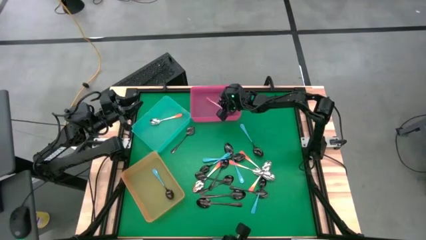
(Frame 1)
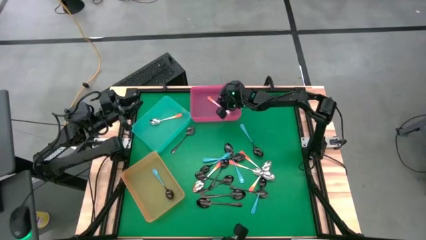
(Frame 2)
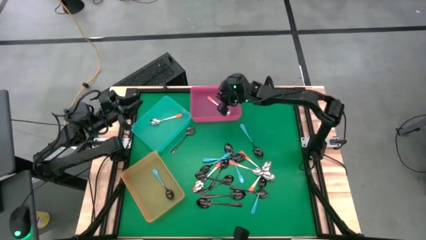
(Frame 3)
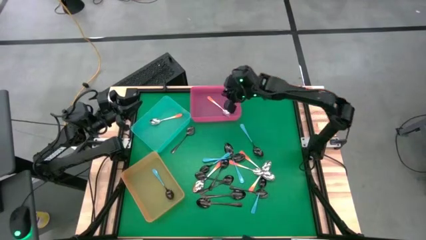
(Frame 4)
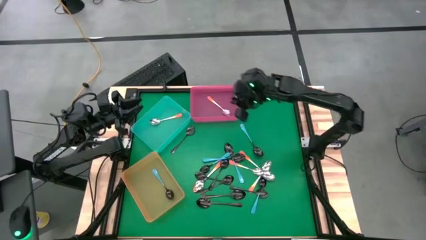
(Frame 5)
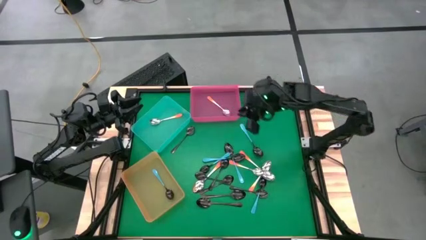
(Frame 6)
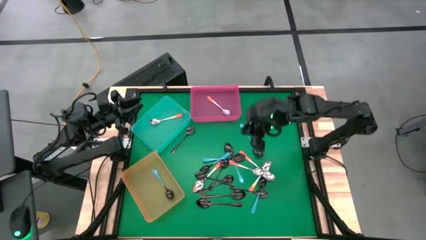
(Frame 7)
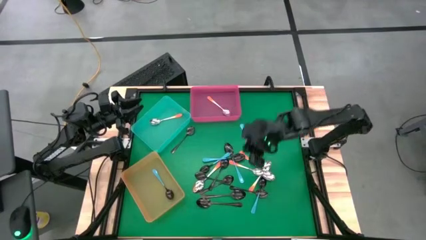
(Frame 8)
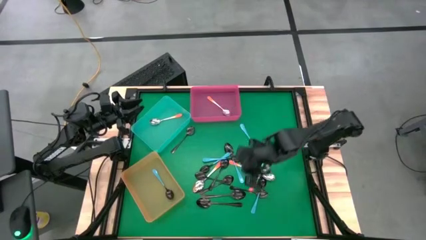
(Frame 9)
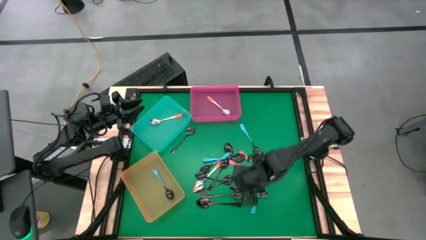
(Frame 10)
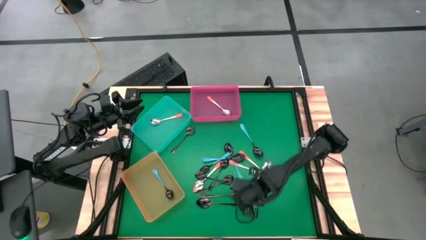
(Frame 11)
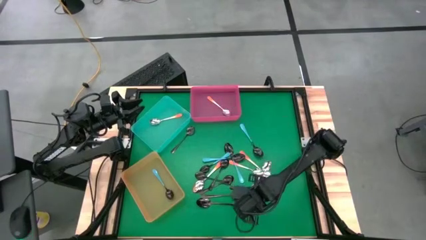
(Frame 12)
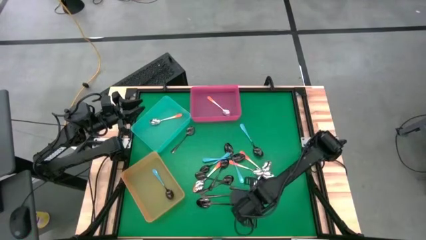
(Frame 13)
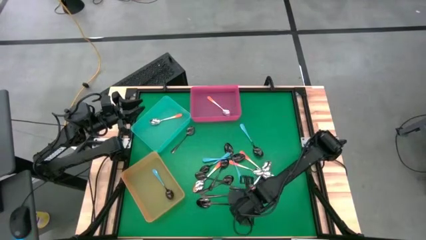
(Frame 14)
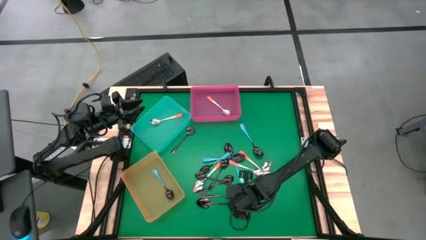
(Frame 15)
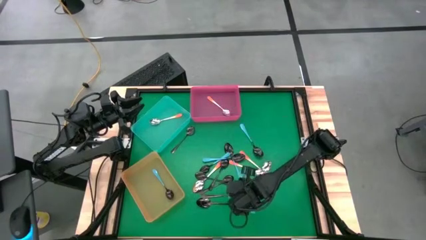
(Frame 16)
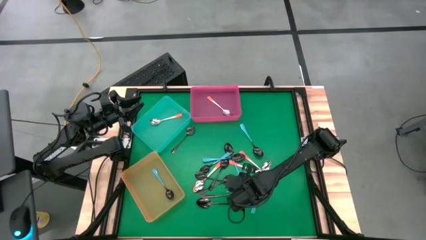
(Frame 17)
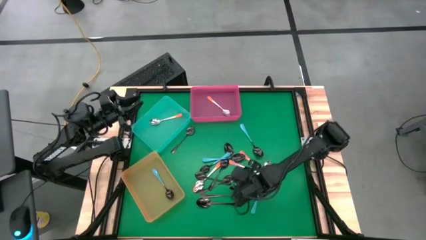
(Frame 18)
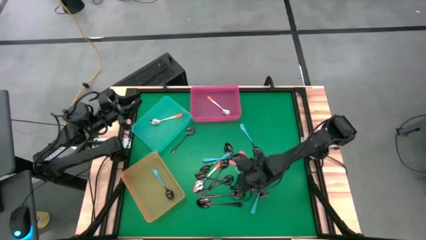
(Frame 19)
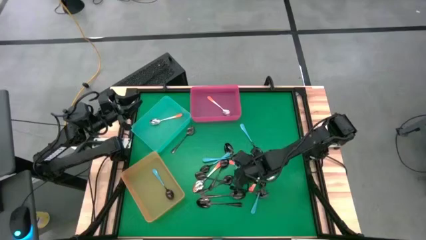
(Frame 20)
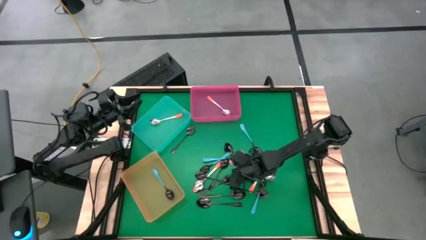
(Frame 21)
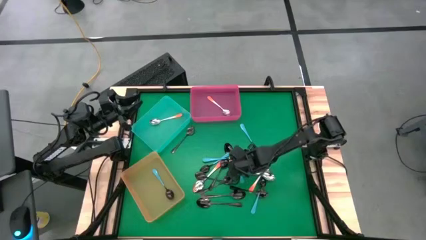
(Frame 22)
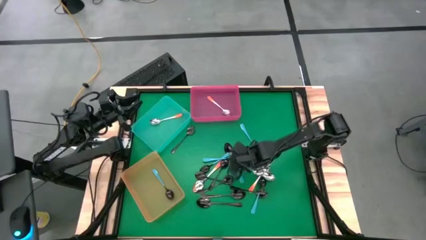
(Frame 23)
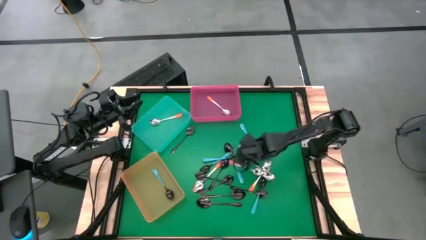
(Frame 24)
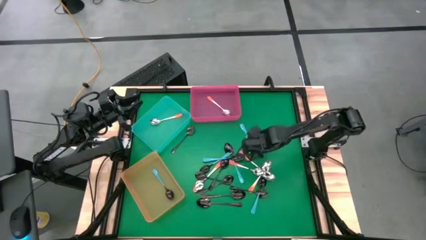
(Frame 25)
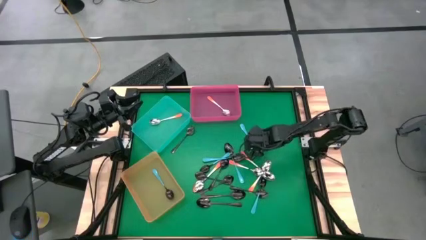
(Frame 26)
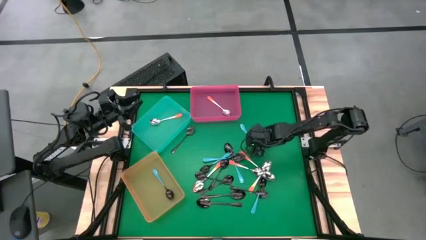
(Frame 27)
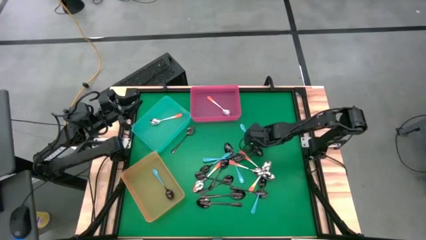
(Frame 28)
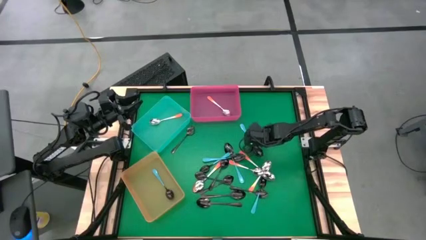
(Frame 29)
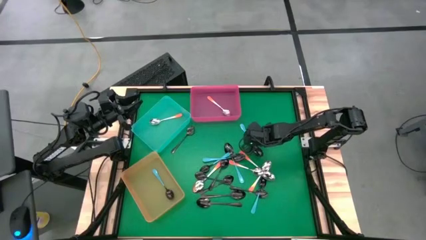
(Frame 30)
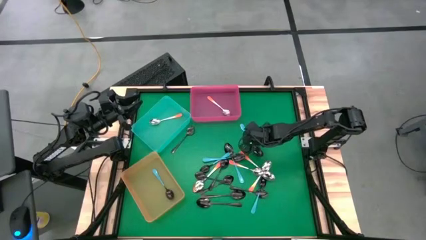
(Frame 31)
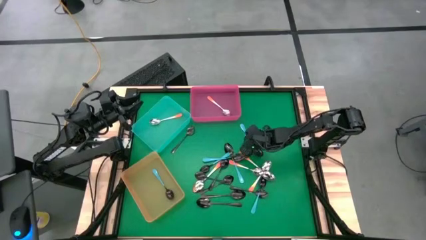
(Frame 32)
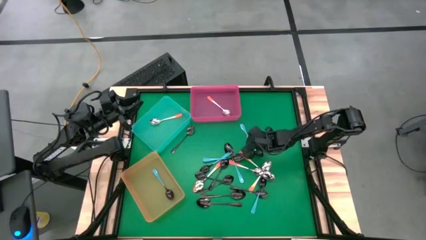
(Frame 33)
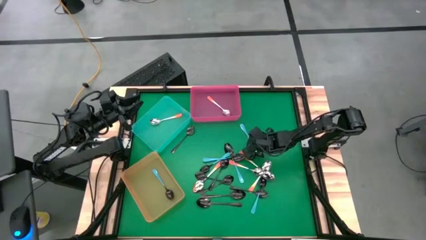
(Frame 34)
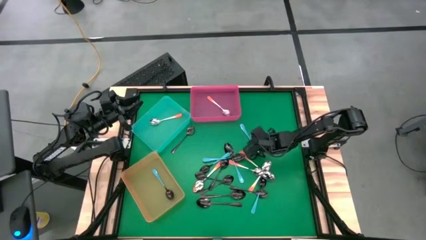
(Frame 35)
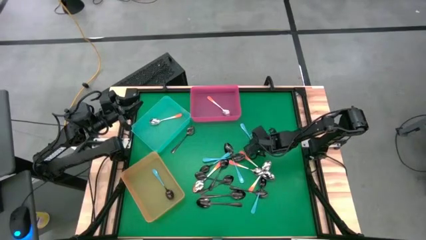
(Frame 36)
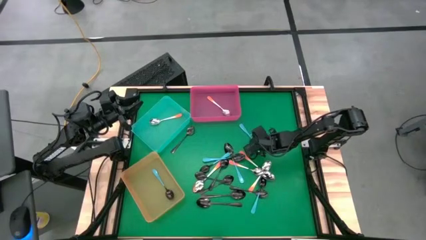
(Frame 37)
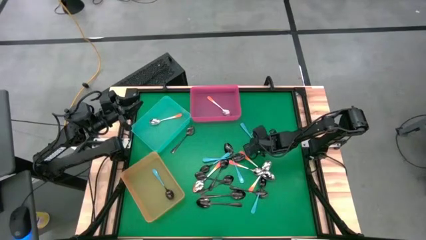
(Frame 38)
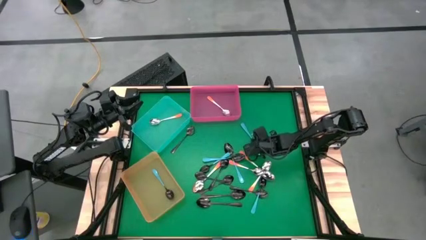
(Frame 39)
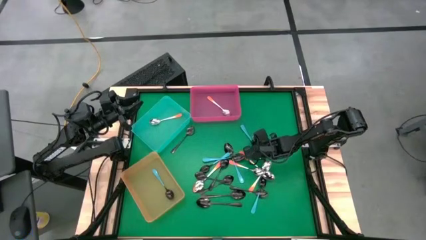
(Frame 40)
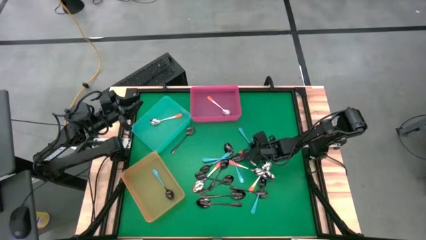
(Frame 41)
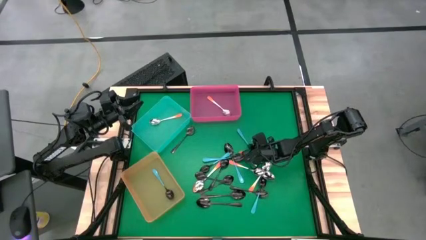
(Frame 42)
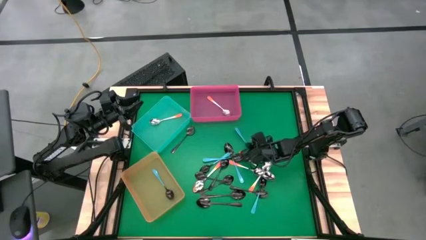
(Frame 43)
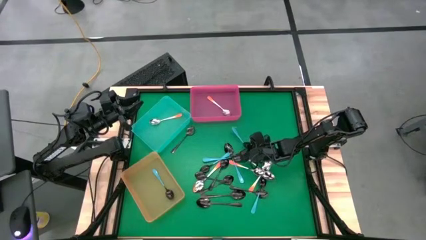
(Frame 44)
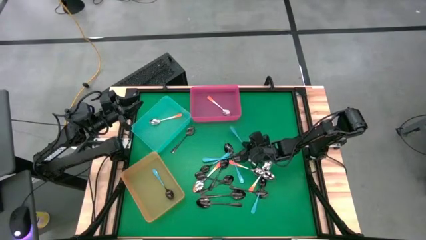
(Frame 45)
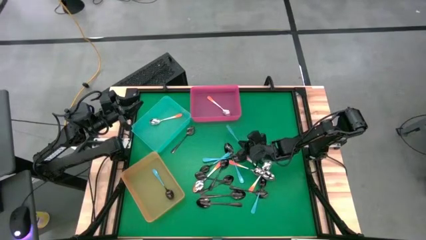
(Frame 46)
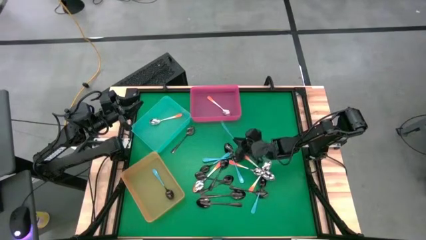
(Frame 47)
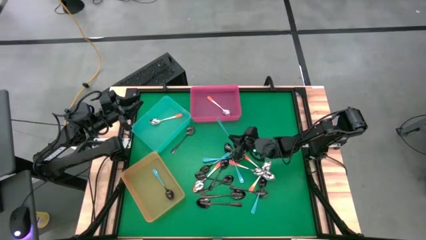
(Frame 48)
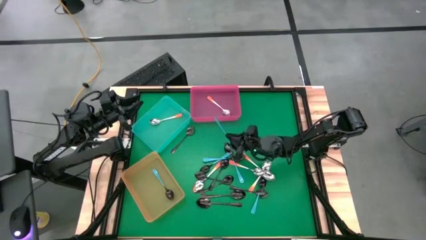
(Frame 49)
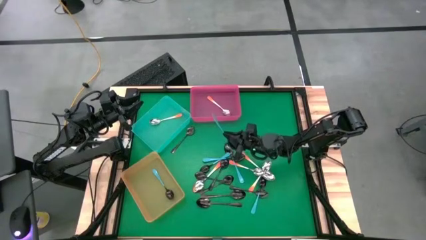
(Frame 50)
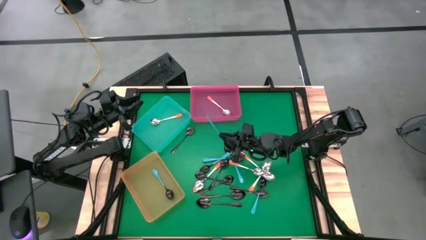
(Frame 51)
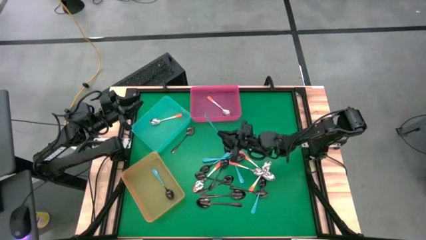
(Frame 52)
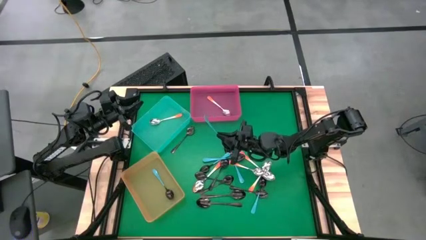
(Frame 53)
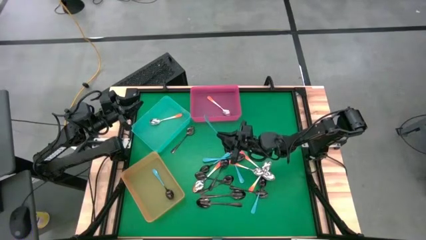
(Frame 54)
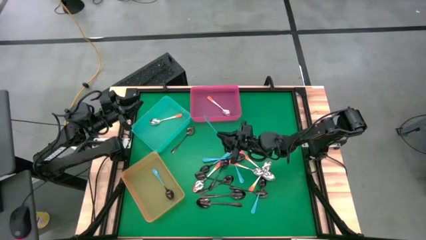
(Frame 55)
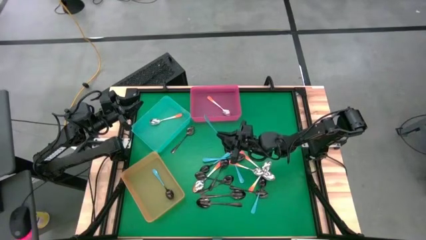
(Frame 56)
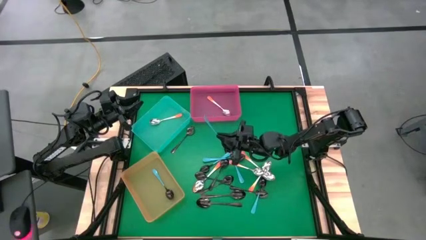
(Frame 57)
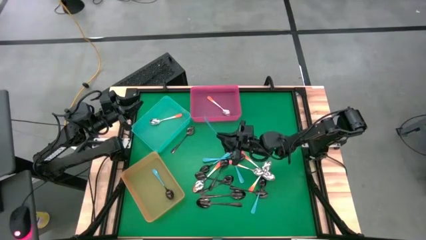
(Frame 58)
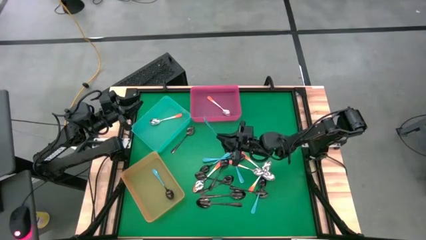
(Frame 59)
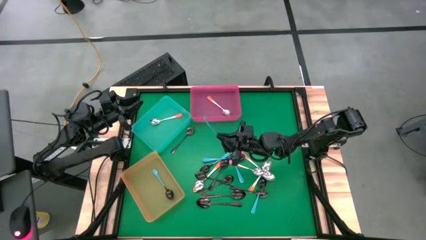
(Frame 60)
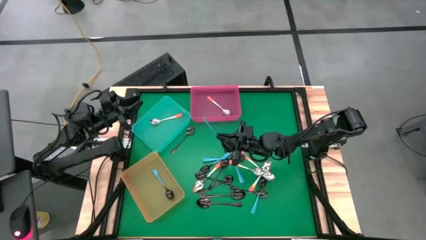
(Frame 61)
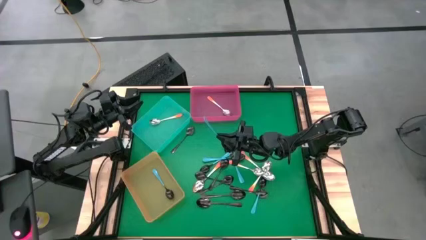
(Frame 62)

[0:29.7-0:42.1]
Task: Sort silverware by color (type)
Put the blue spoon into the orange bin

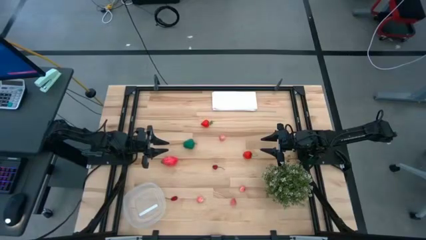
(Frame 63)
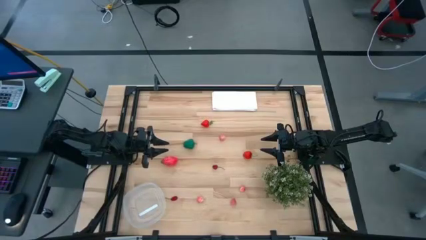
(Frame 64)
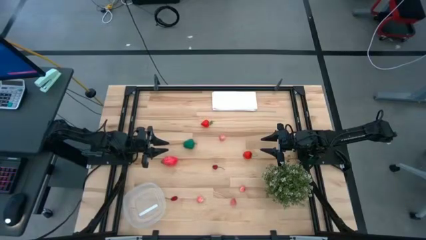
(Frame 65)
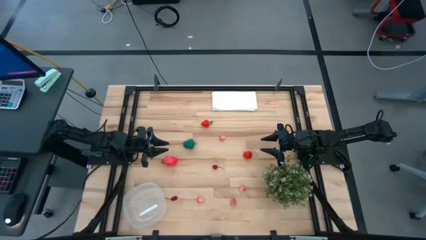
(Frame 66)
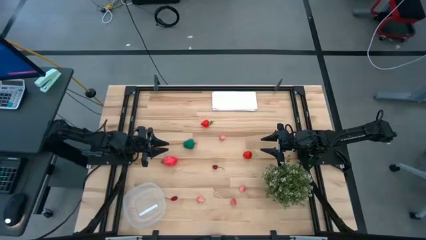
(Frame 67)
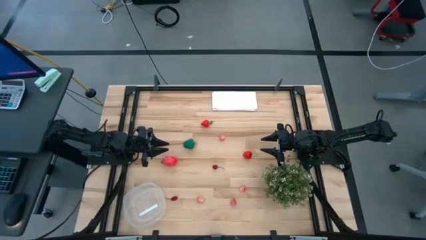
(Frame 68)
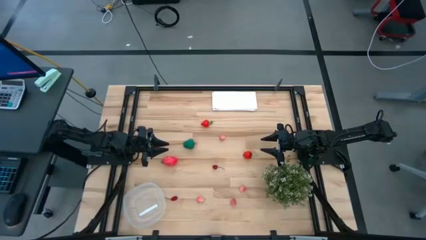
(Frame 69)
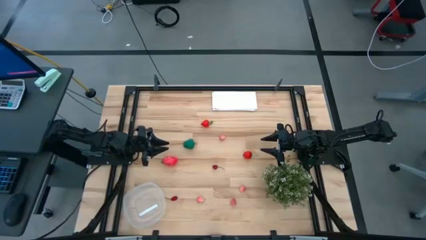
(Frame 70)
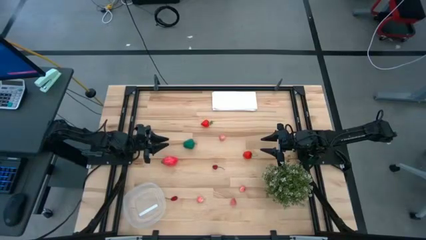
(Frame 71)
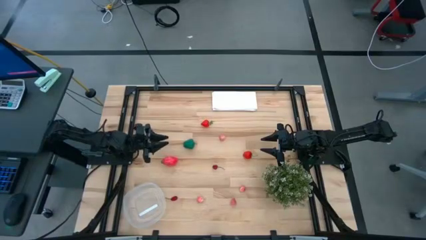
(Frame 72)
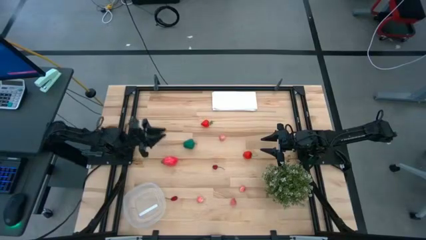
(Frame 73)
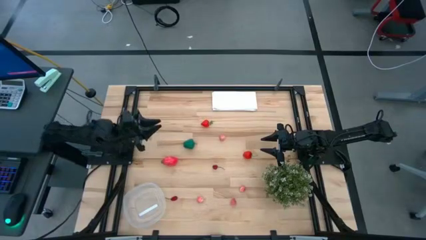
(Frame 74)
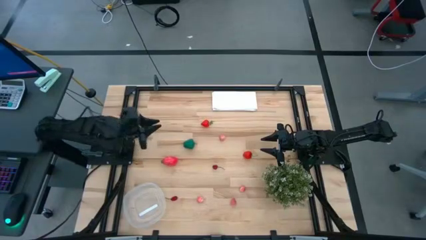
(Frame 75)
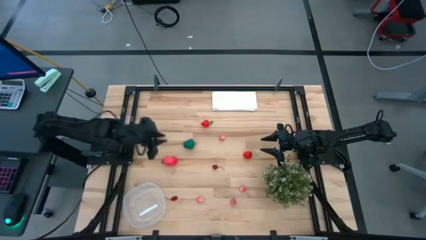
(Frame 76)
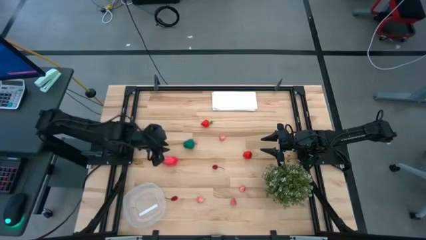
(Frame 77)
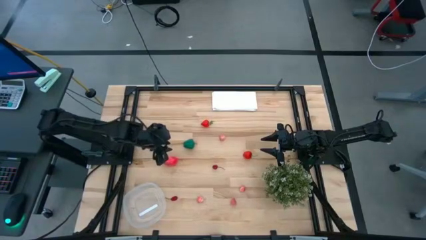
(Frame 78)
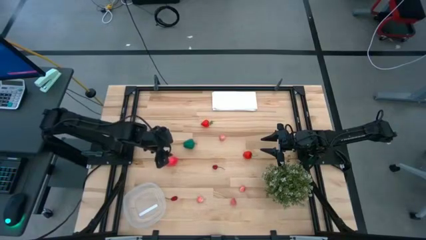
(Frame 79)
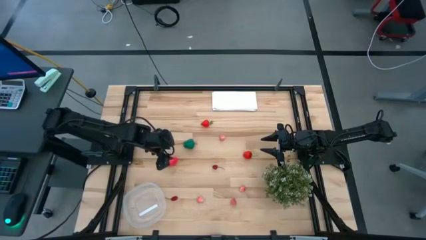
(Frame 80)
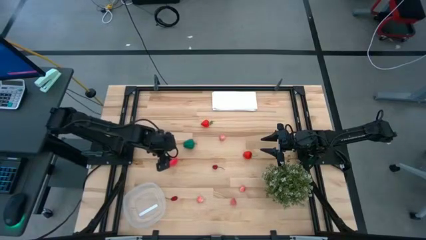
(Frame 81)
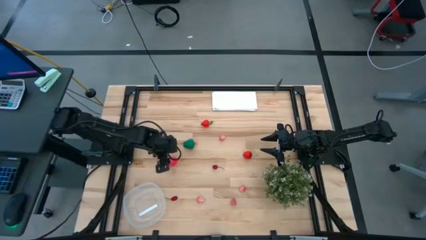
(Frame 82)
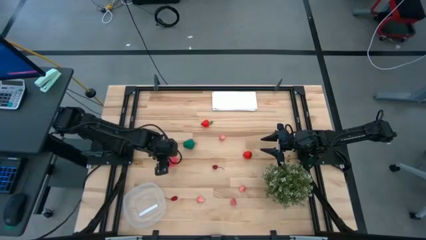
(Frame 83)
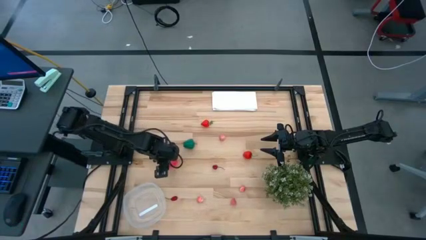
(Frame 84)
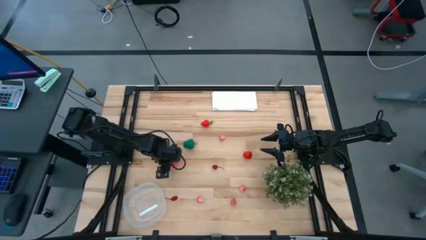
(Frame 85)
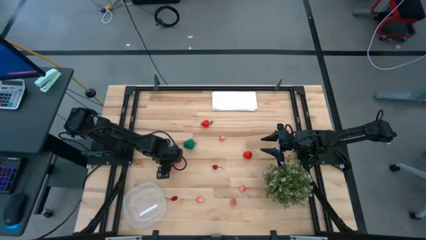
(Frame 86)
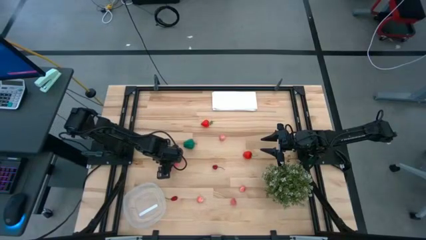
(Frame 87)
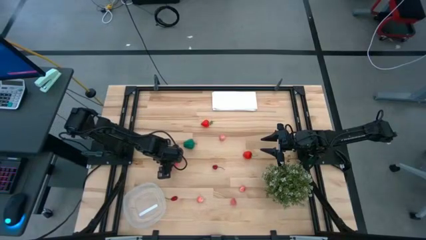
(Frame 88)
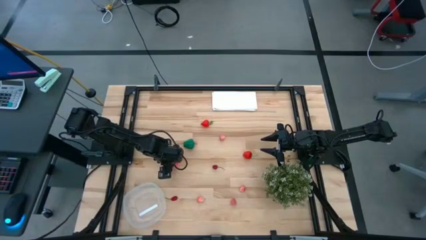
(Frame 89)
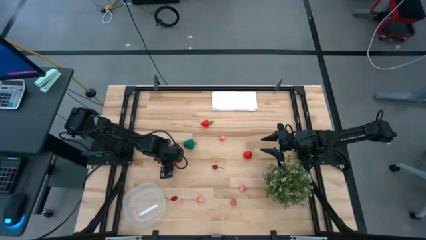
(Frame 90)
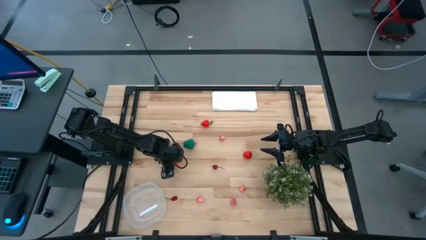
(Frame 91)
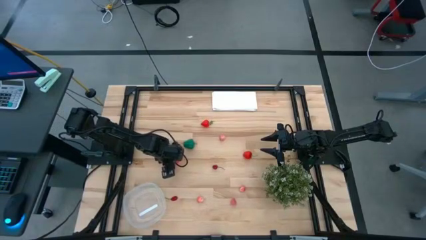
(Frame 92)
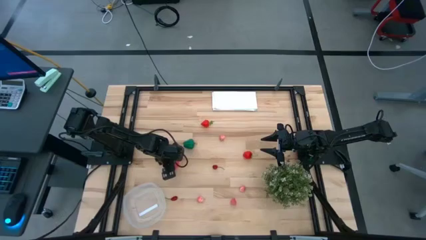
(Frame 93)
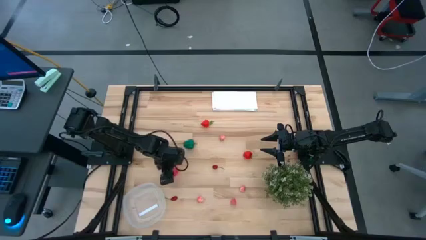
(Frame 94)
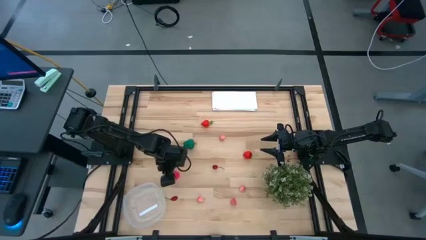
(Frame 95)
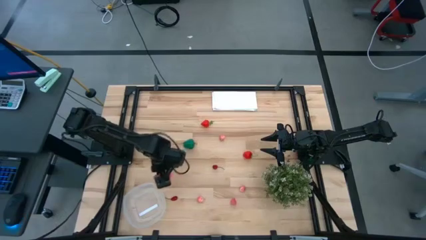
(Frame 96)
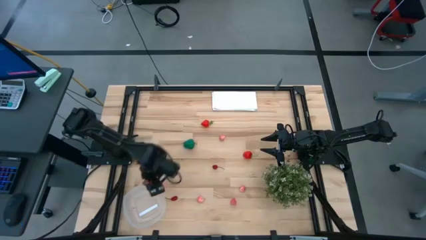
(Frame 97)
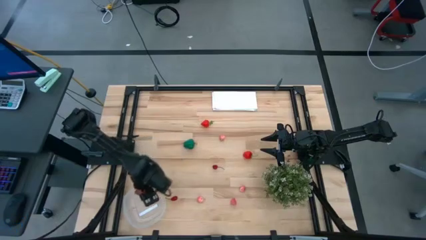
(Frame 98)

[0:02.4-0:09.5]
Task: Pick and placing Produce into tupperware
Put the dragon fruit into the transparent plastic container
